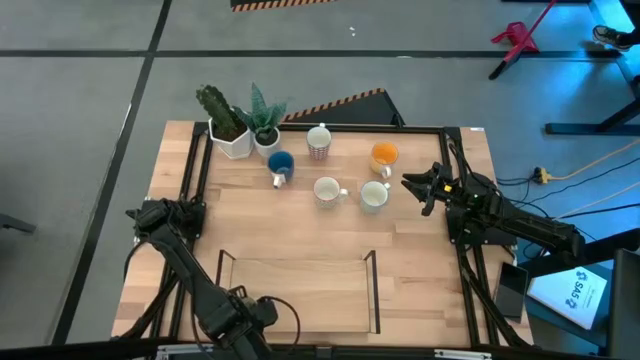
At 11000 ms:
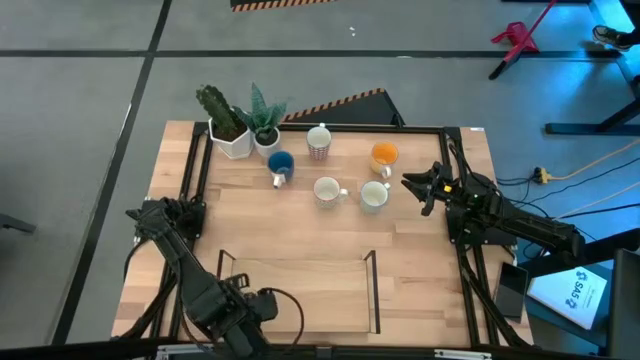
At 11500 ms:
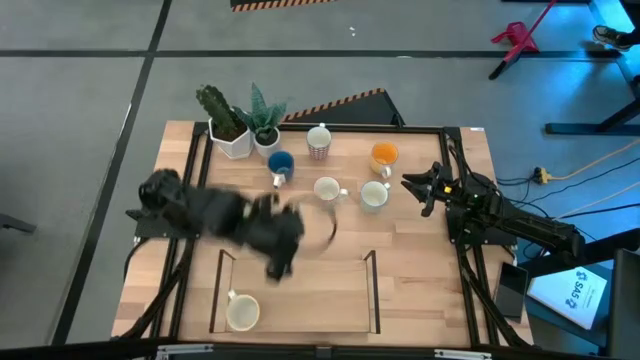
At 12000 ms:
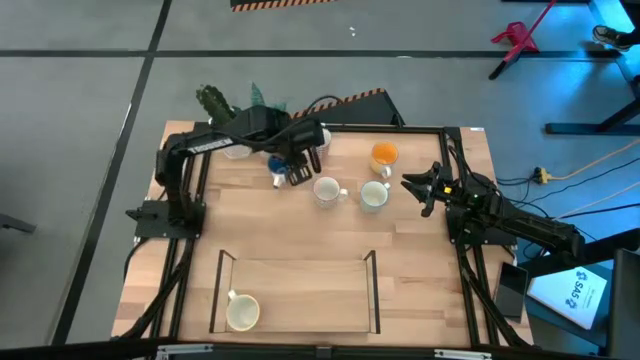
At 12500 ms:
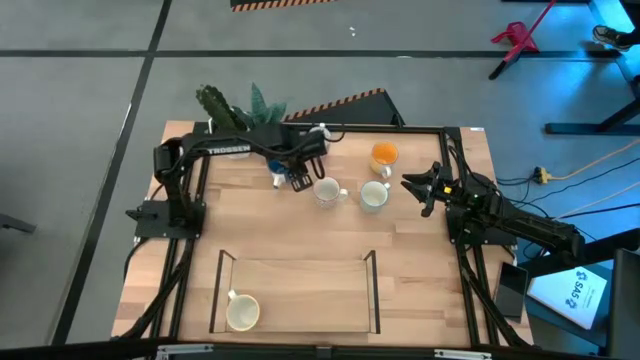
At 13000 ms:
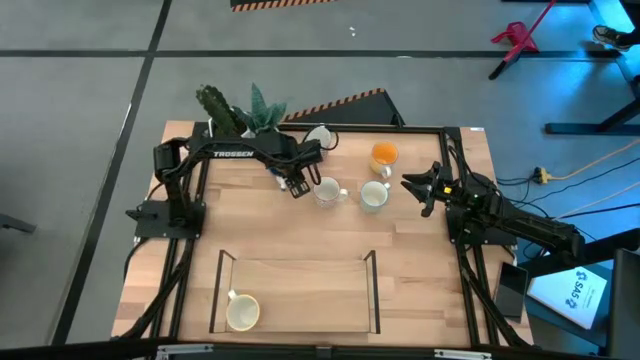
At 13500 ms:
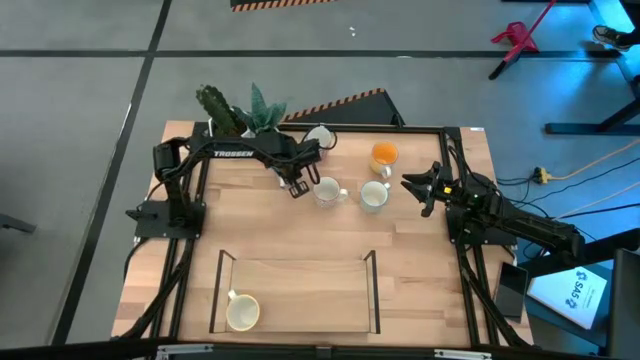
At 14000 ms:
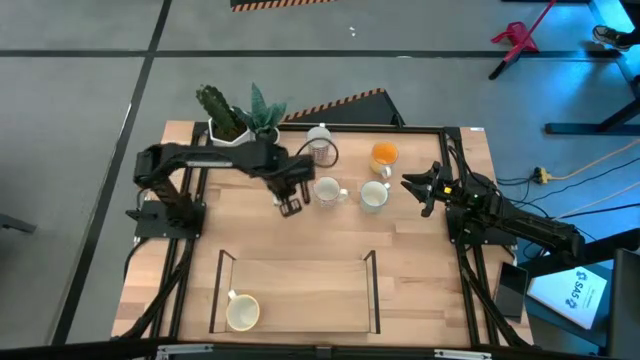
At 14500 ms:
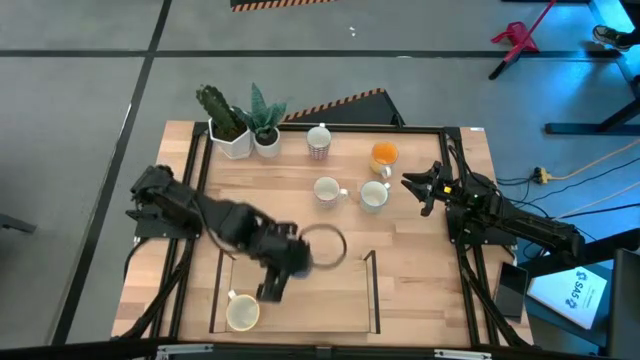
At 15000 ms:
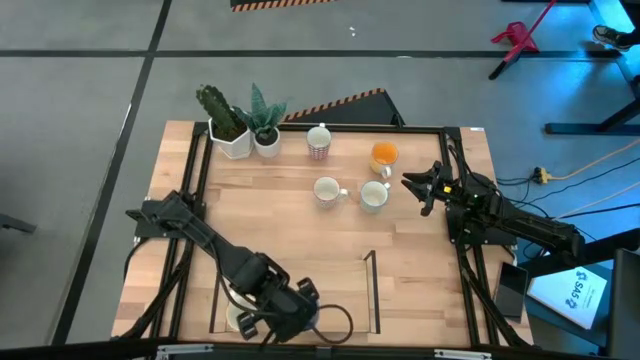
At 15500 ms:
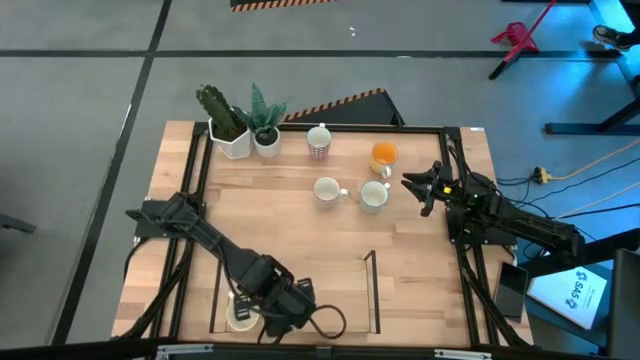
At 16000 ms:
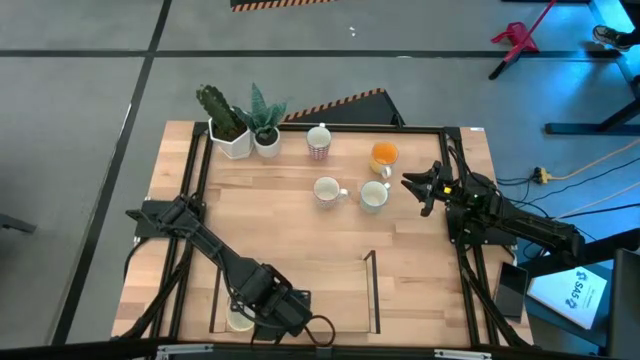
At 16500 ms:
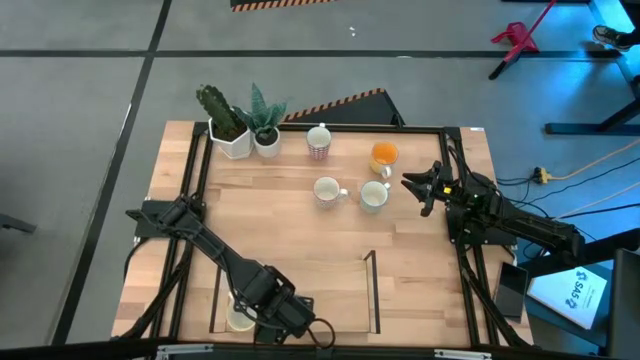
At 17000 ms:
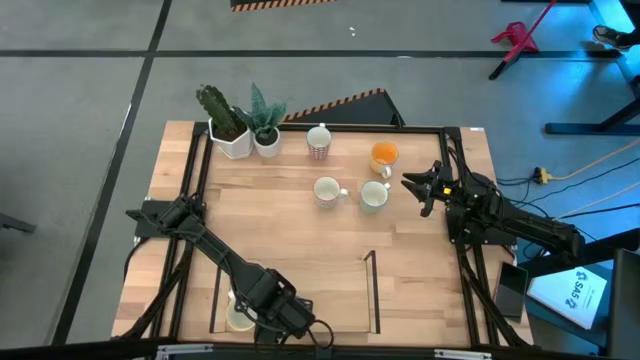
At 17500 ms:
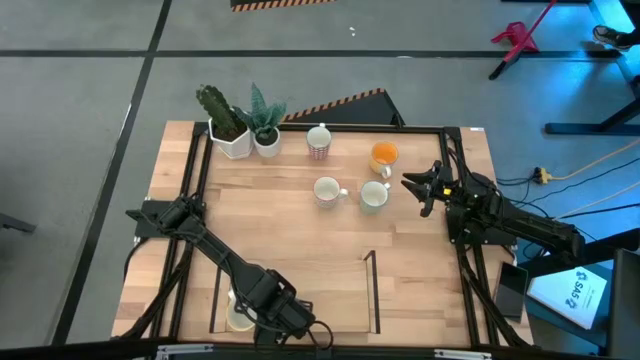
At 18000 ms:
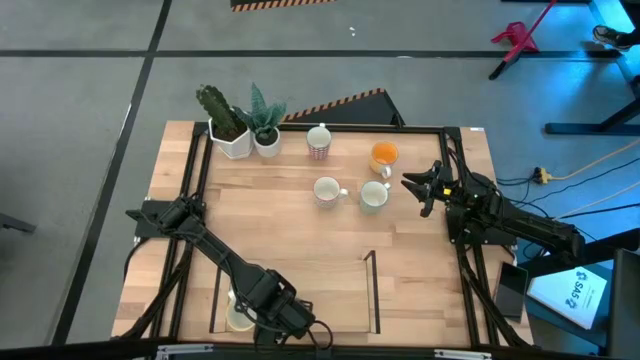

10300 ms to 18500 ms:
Task: Place coffee mugs
Put the blue mug on the shelf

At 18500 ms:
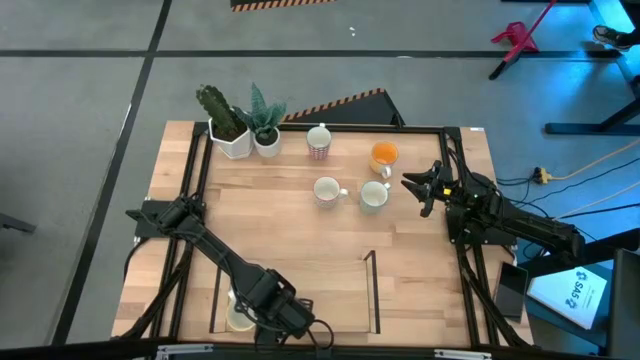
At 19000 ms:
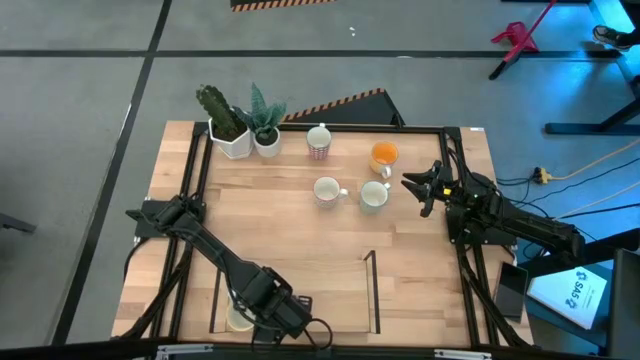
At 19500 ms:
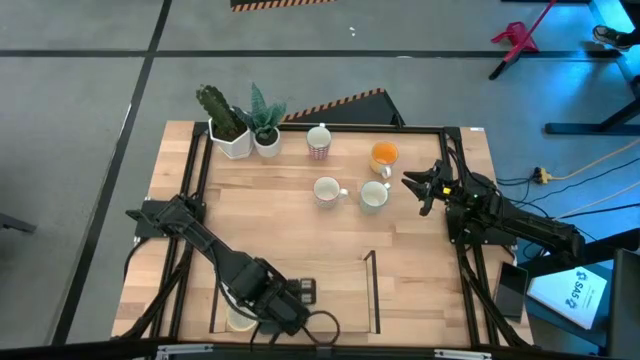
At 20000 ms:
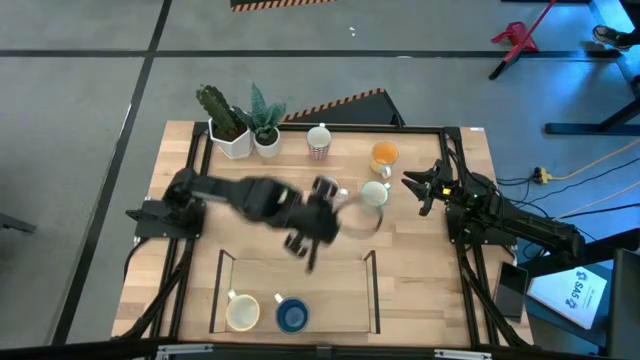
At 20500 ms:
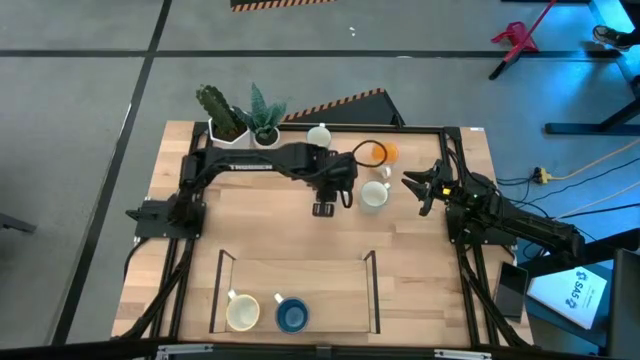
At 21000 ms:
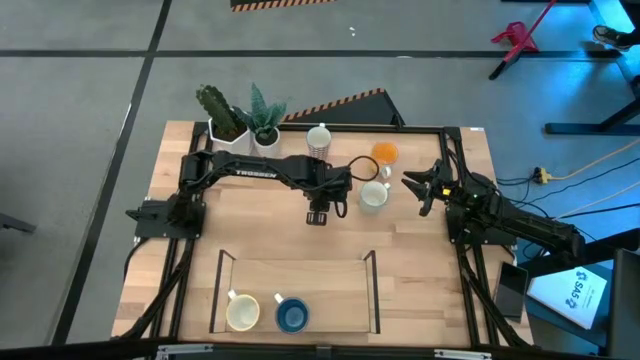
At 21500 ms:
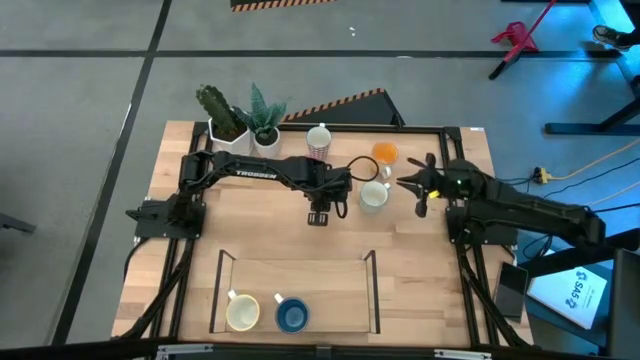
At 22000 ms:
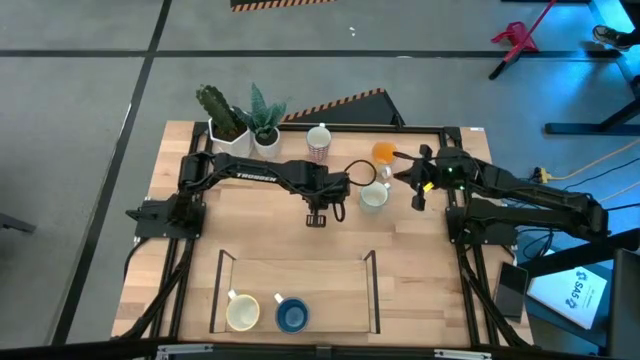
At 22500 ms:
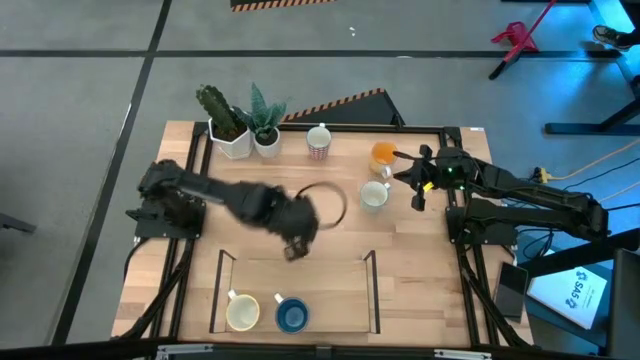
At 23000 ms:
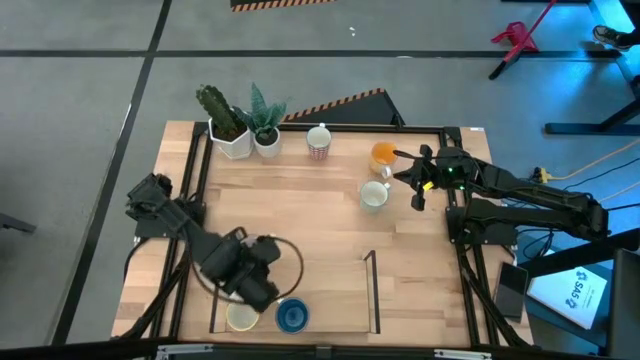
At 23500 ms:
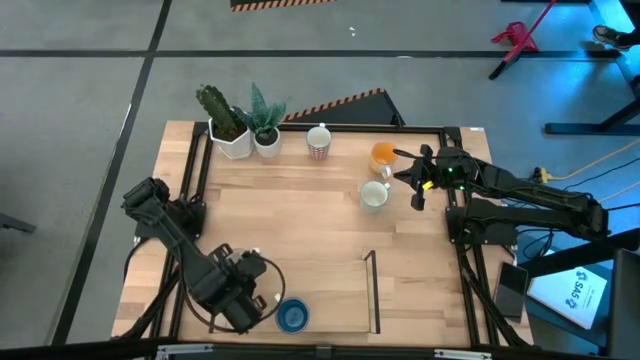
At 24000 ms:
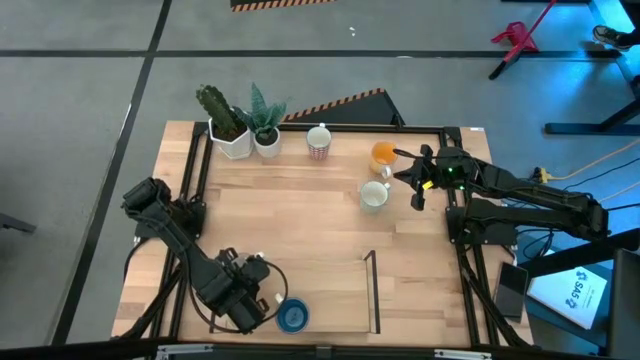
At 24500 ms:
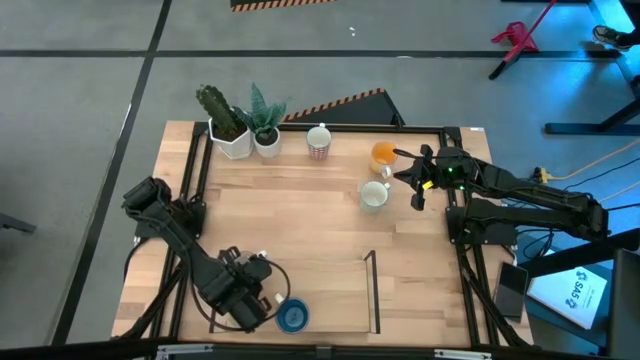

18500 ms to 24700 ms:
Put the gray patterned mug on the shelf

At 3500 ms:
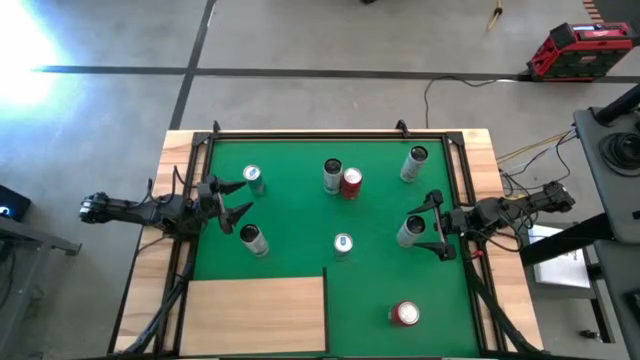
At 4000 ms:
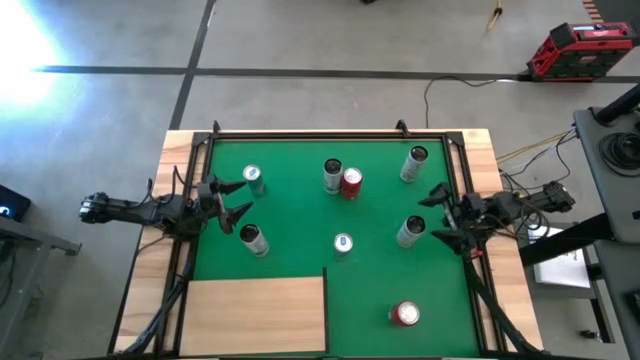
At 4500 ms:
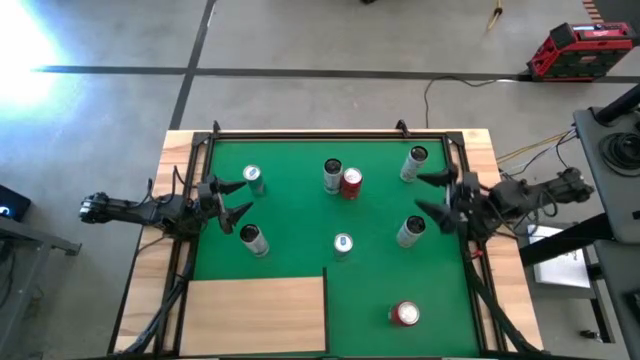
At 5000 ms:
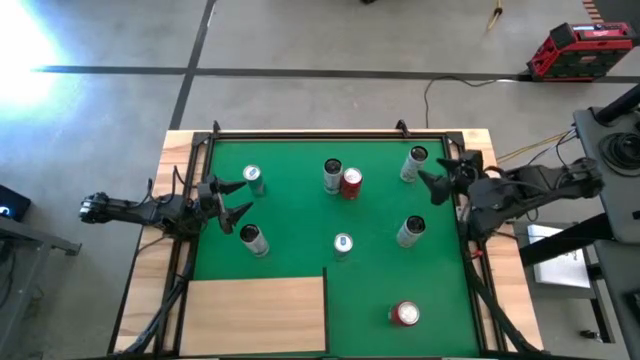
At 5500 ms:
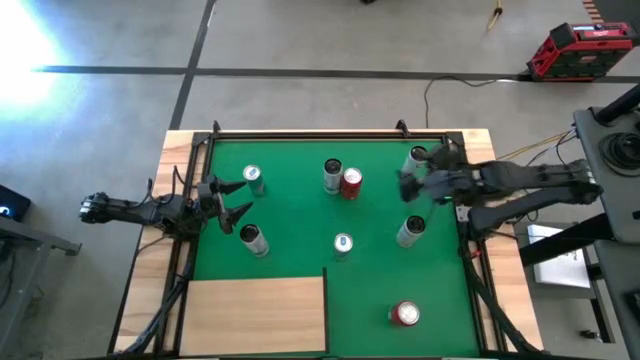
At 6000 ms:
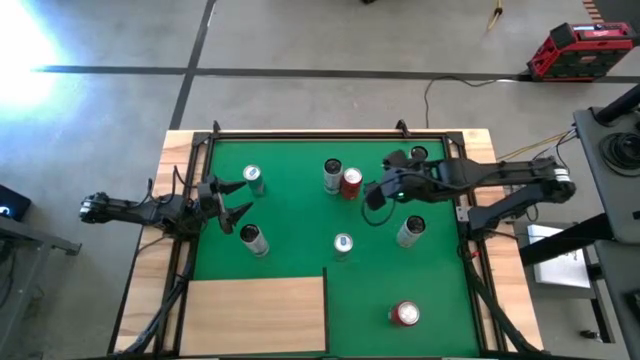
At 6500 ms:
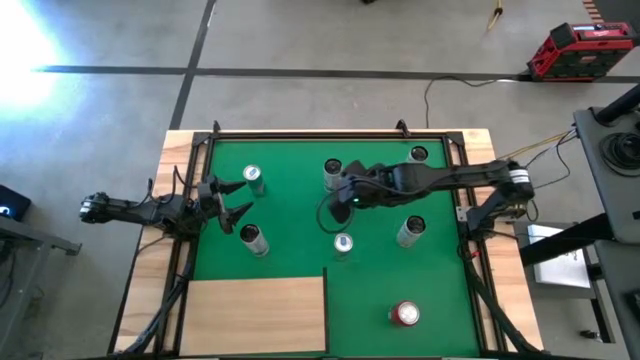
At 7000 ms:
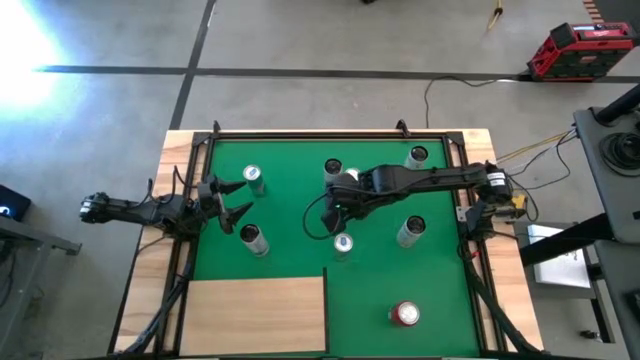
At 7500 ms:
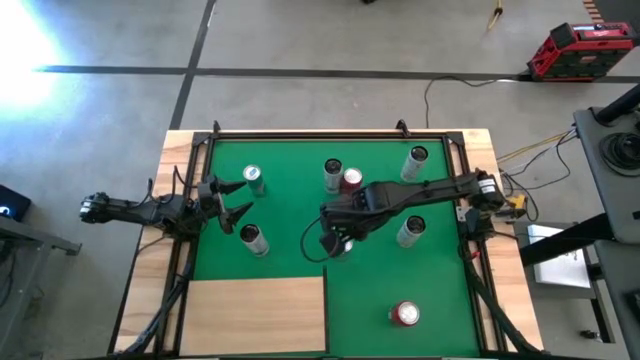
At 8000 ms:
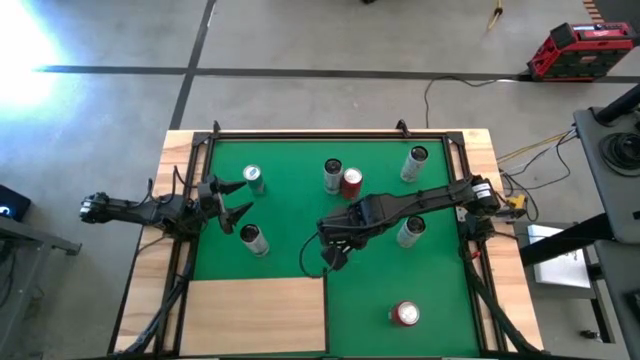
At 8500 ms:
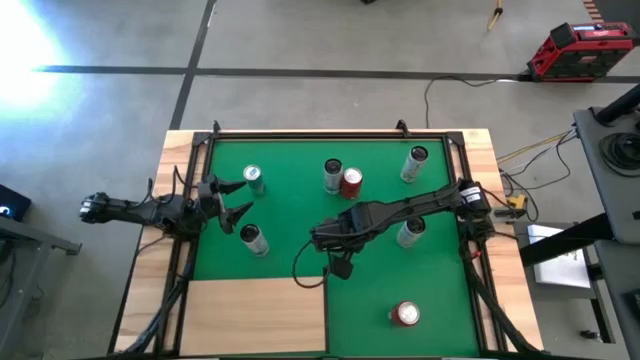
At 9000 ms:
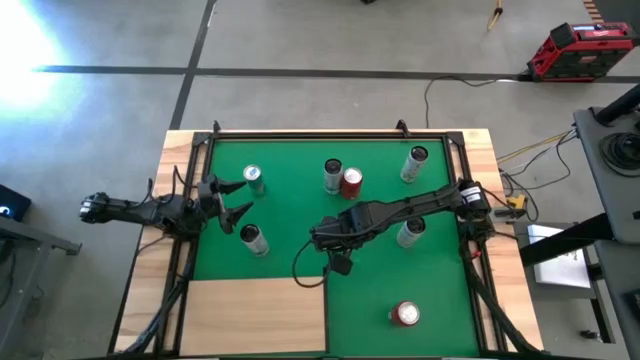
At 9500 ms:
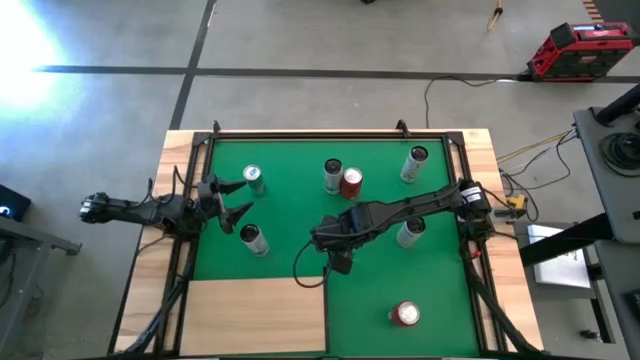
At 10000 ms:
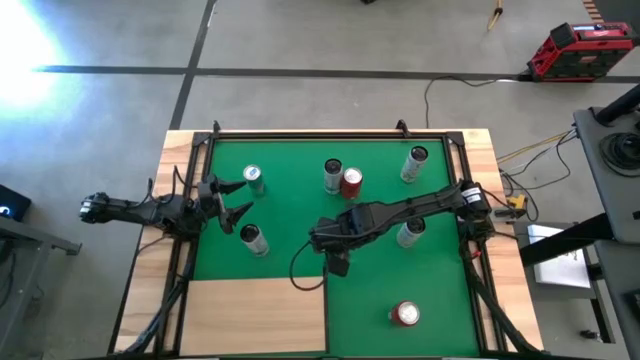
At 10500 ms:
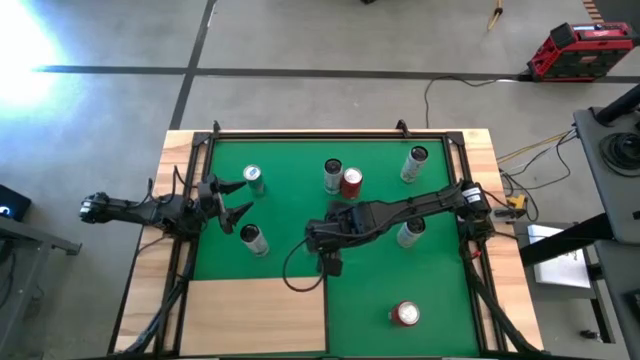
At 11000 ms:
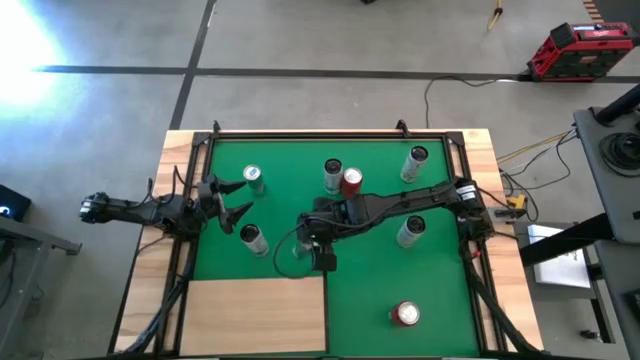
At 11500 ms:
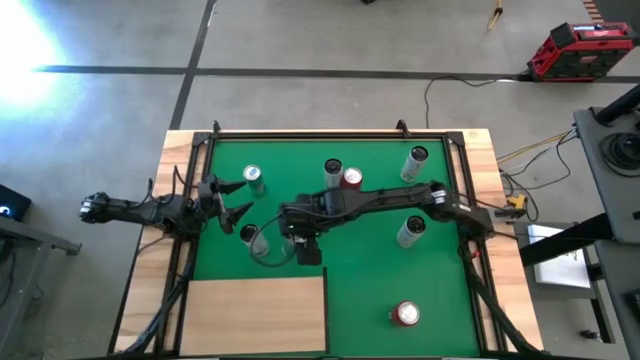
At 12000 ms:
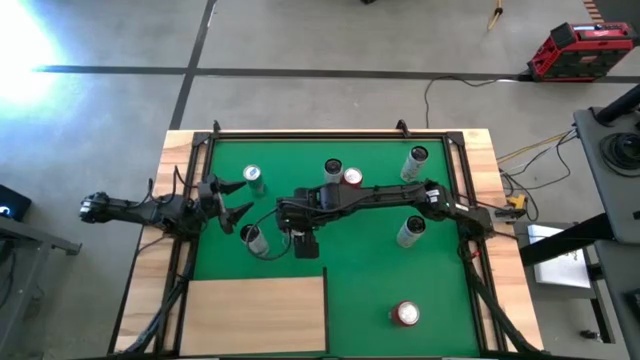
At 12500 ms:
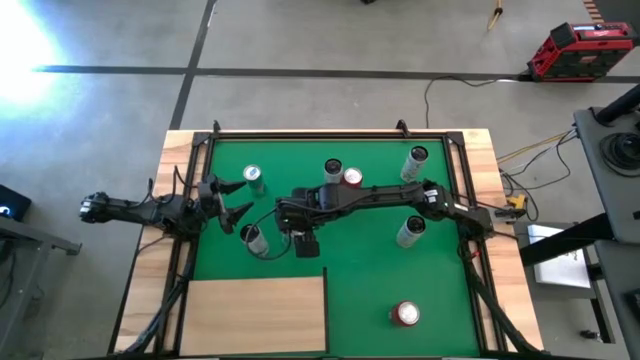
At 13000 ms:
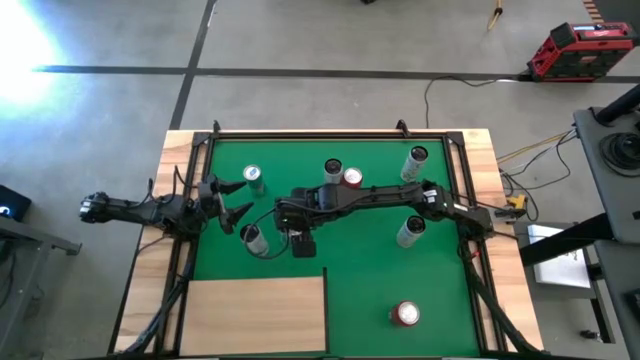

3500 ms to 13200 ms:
Task: Place canned beverage on shelf
Move the bottom blue soda can to the left of the table
